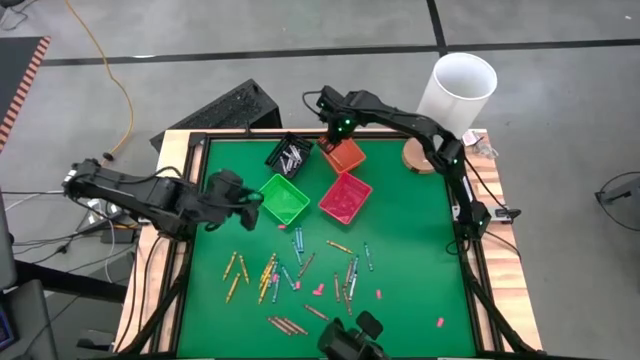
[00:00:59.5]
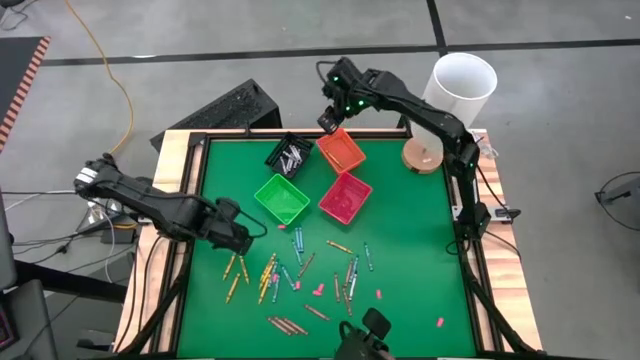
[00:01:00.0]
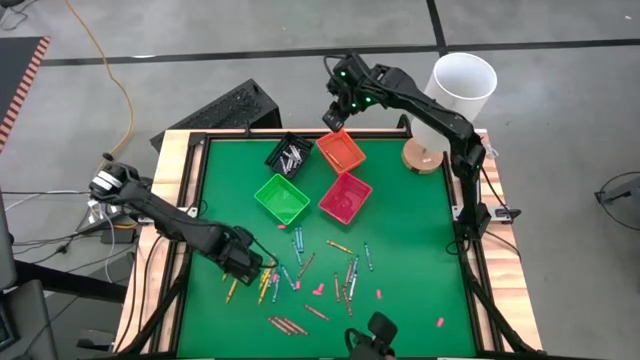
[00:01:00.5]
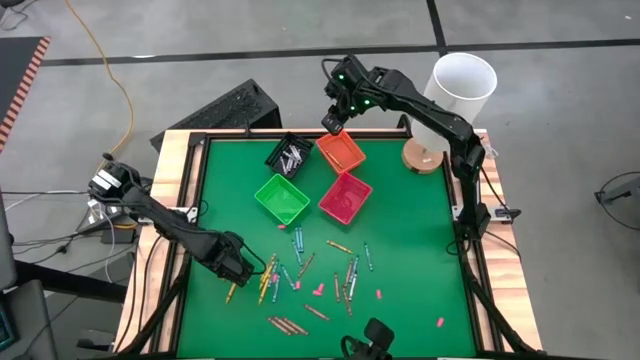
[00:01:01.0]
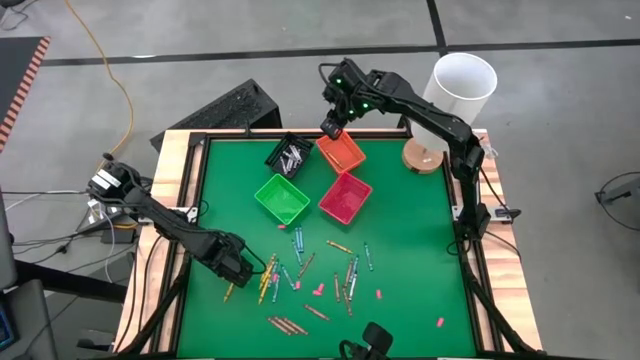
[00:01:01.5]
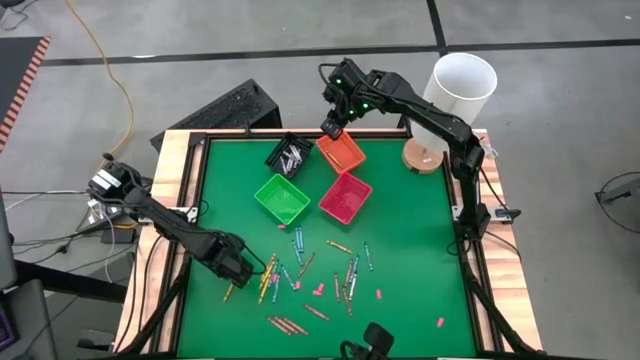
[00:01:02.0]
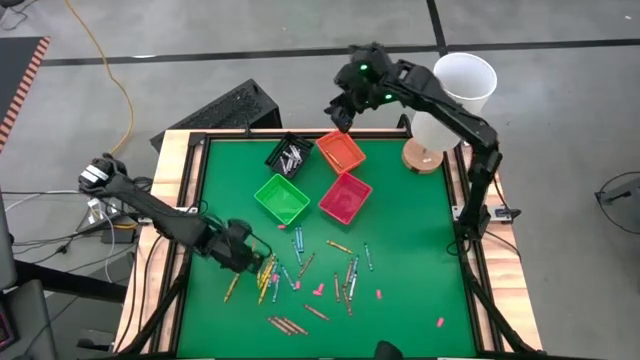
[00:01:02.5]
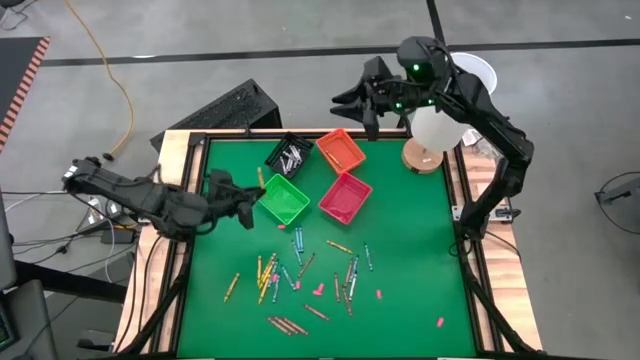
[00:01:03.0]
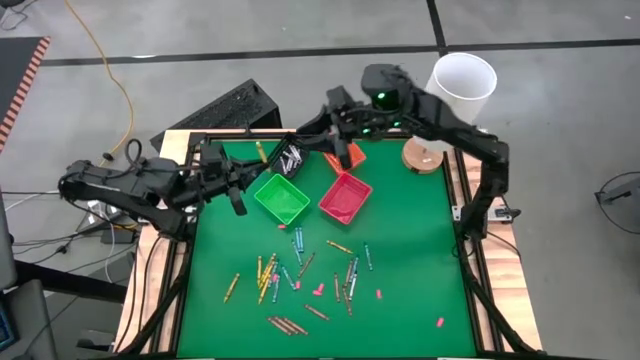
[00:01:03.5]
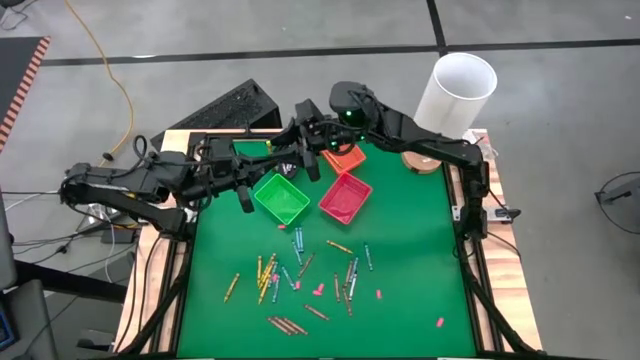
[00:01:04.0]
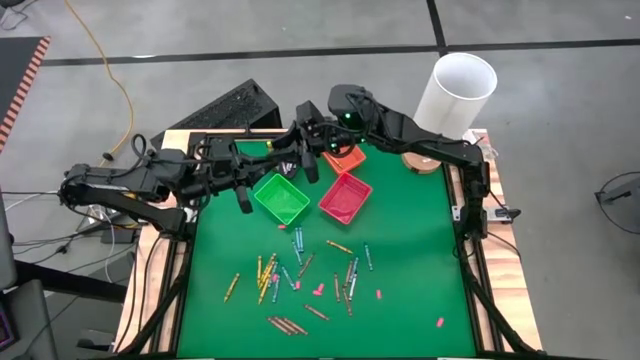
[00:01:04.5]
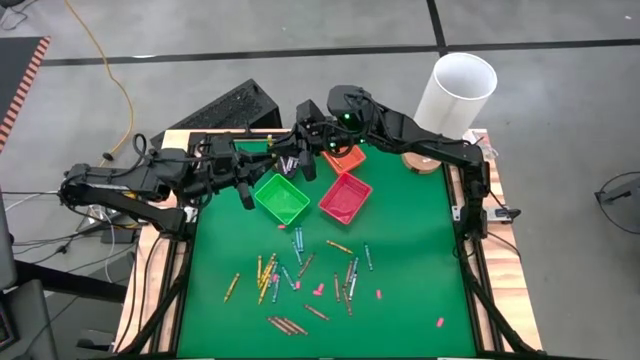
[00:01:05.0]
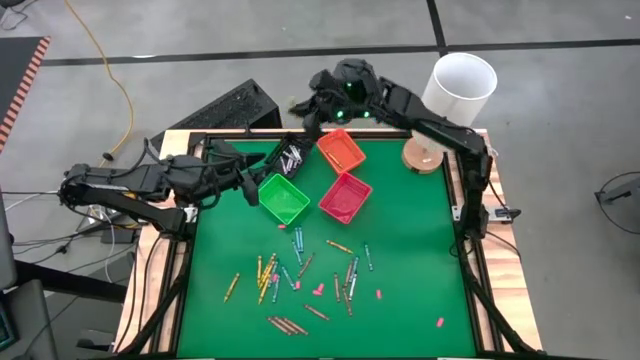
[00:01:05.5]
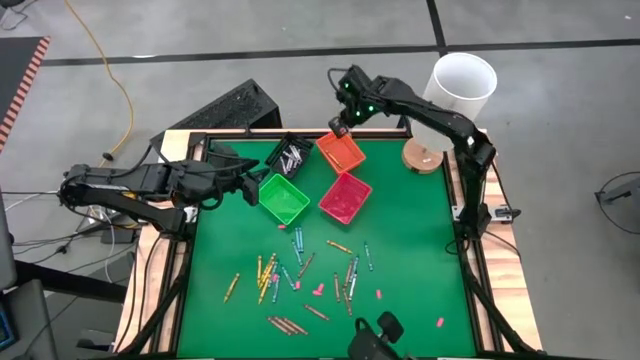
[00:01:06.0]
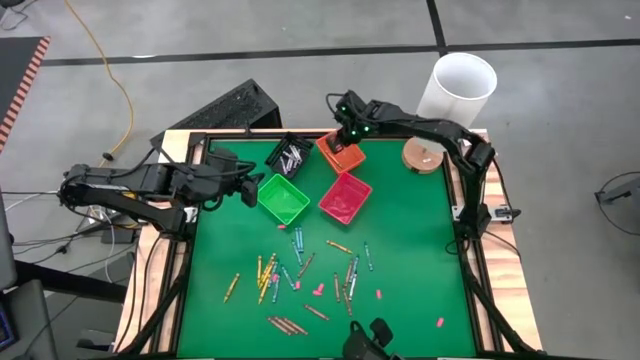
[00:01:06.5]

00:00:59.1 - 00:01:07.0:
Task: Sort crayons
Put the yellow crayon into the bin

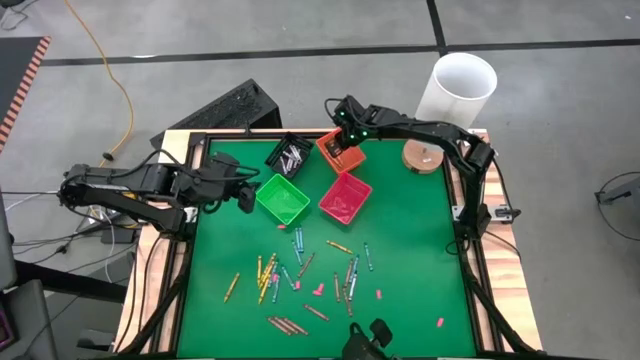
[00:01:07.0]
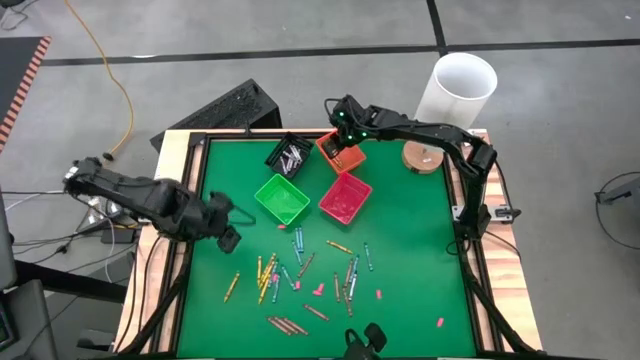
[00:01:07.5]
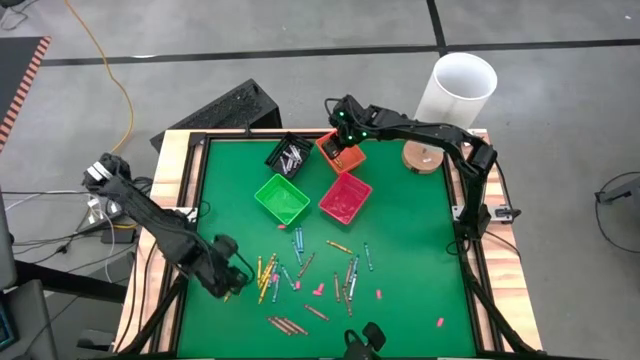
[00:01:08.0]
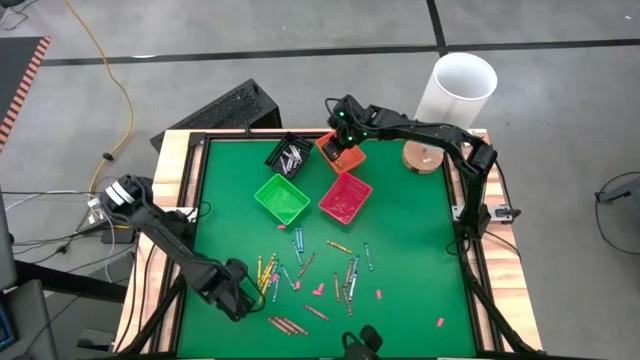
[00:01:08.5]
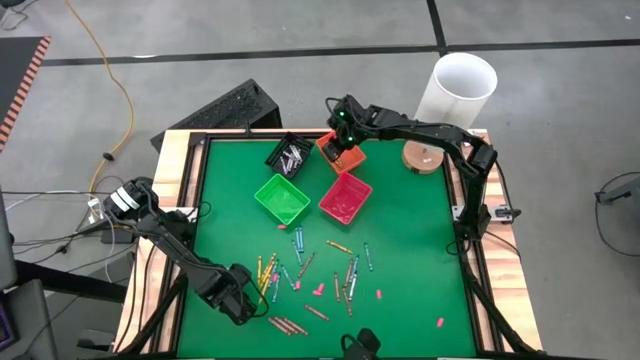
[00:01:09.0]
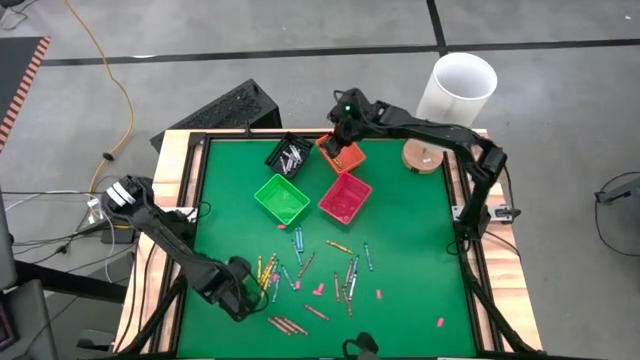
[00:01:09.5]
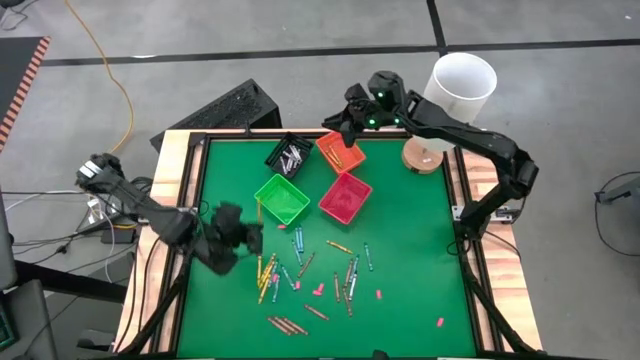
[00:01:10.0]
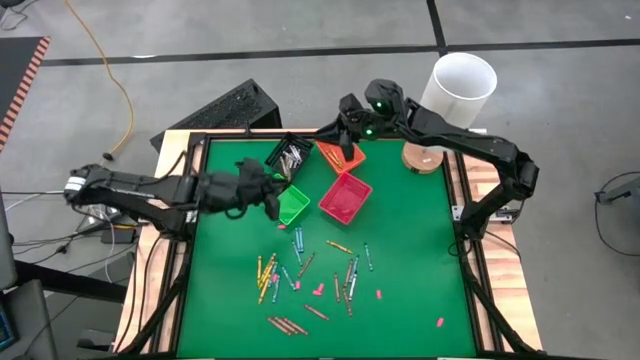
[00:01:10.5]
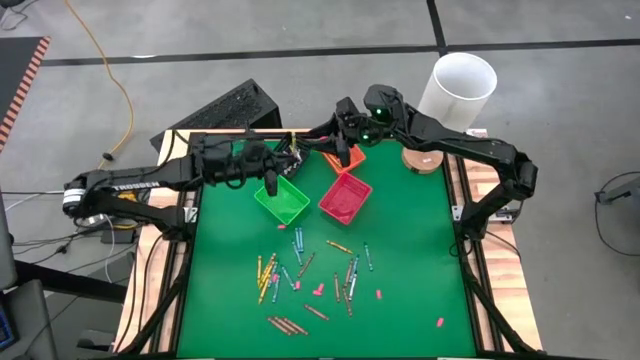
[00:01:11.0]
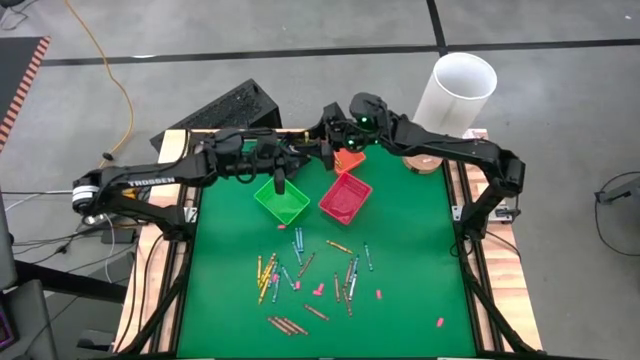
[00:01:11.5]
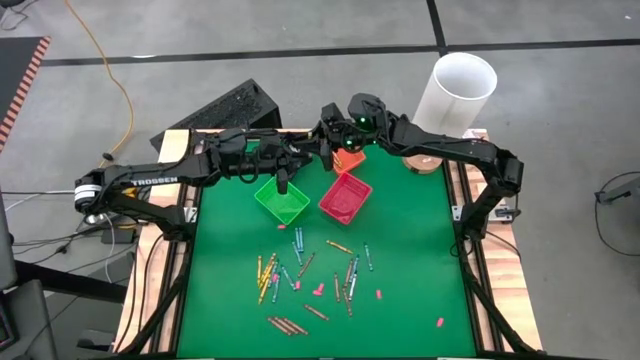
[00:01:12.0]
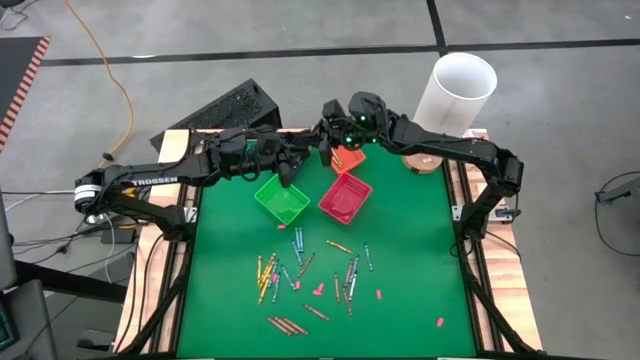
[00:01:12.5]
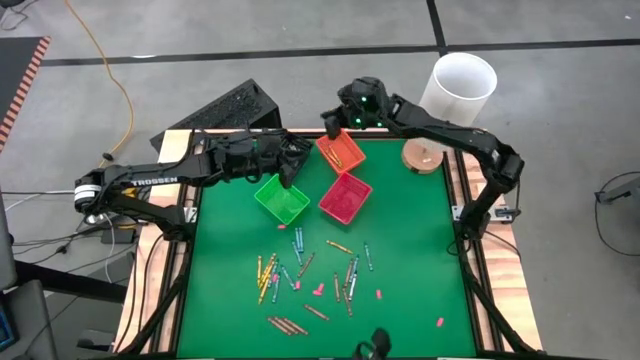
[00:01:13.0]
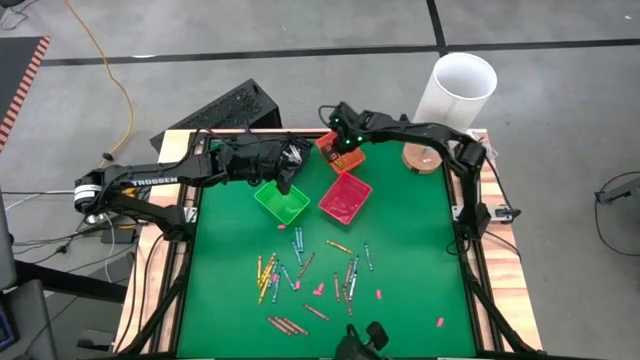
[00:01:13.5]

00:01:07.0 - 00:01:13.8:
Put the yellow crayon into the bin

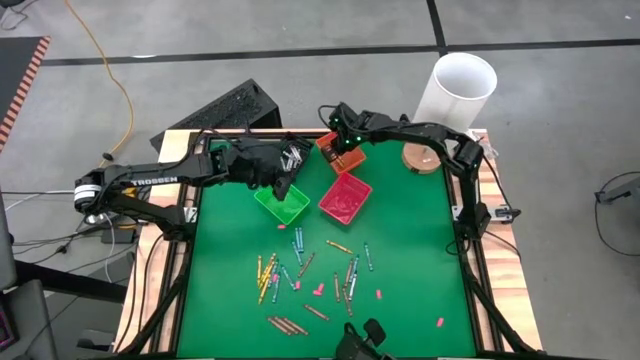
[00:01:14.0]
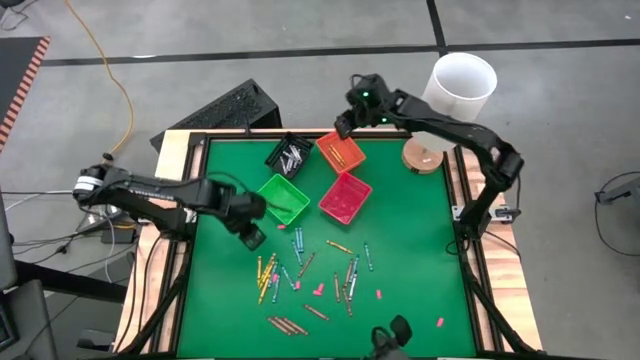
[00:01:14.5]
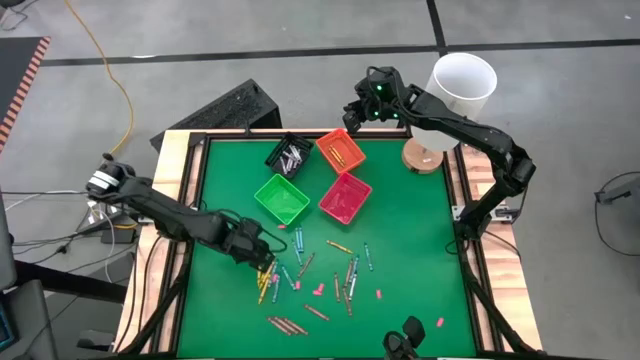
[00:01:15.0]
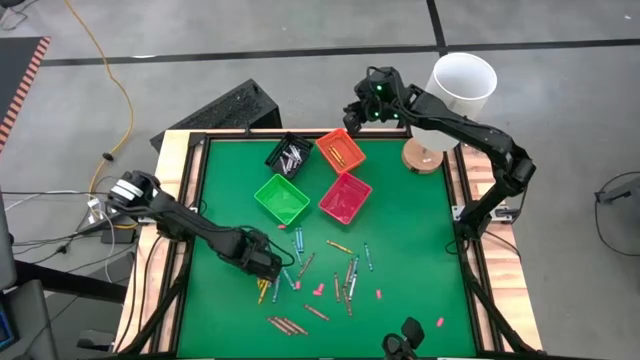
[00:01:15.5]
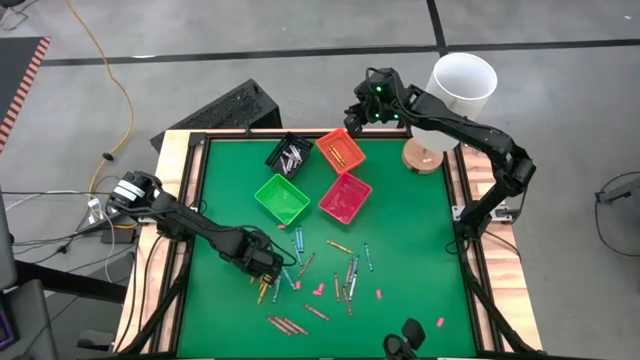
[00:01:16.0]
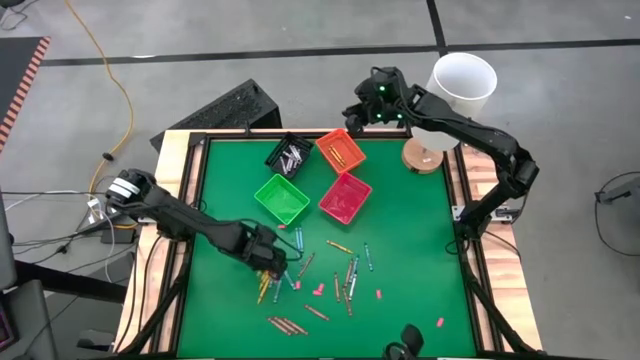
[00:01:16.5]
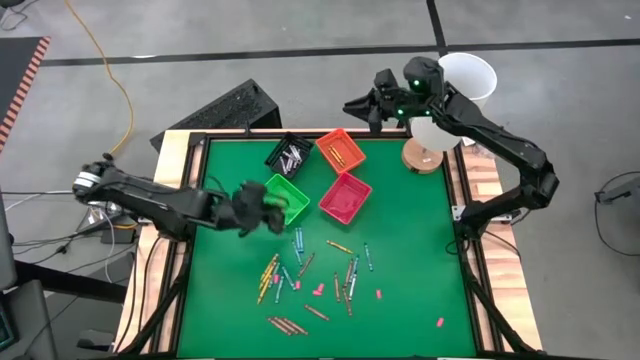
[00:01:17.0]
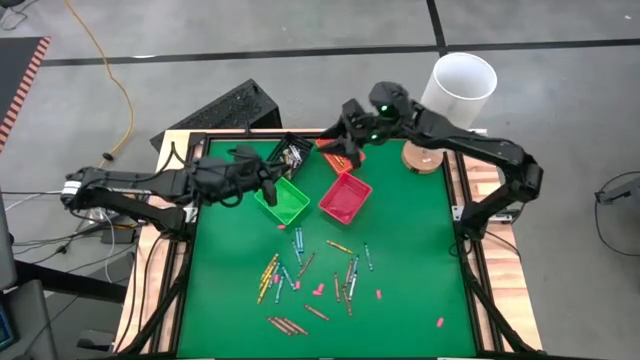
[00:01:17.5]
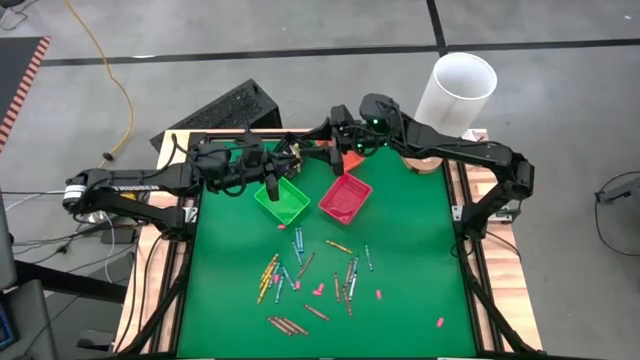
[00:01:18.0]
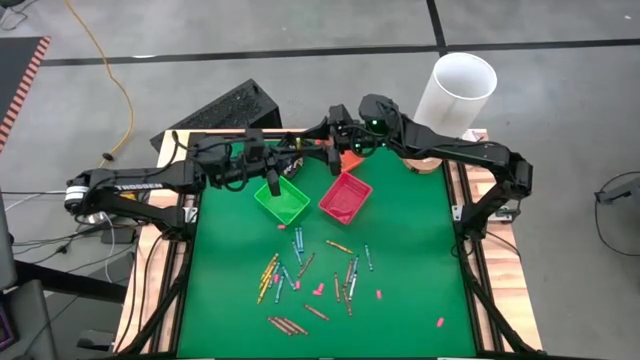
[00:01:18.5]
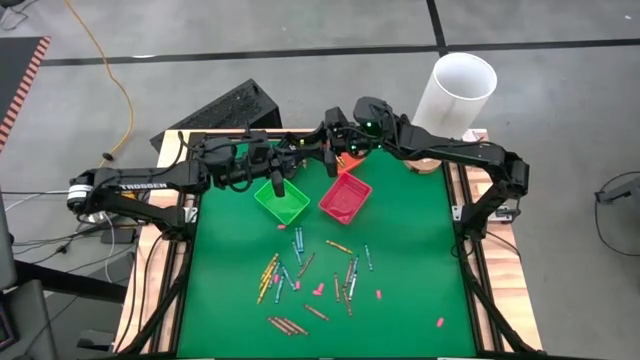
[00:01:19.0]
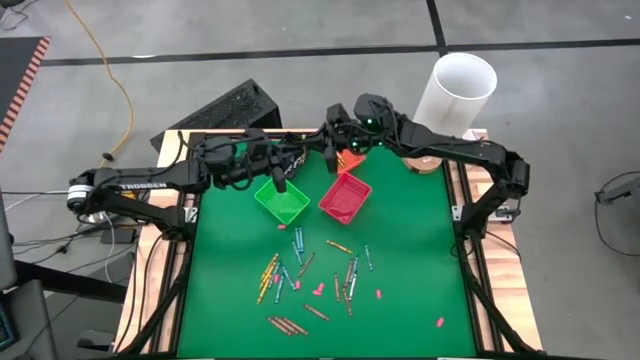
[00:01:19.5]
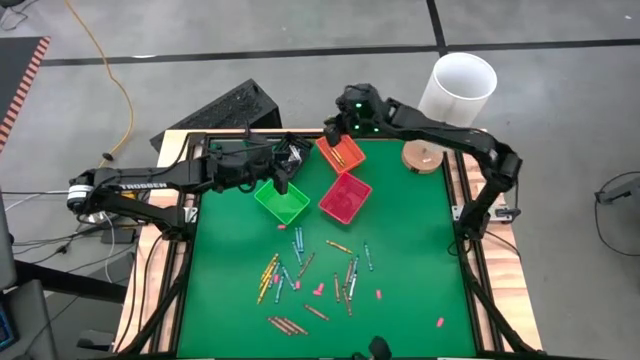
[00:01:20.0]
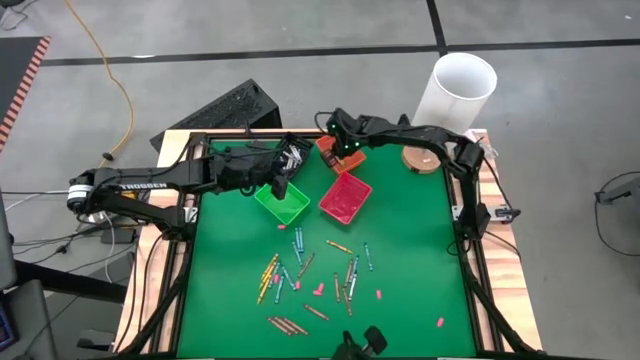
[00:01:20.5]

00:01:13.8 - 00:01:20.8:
Put the yellow crayon into the bin
